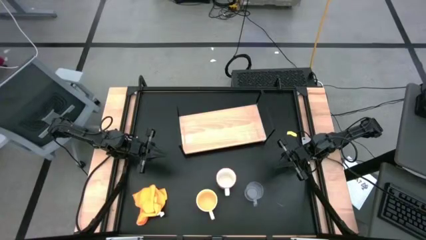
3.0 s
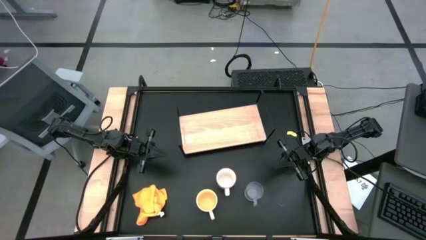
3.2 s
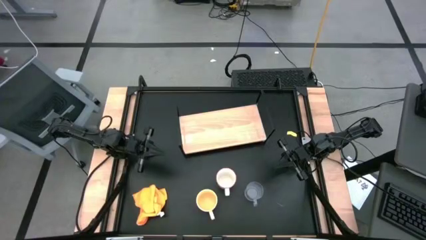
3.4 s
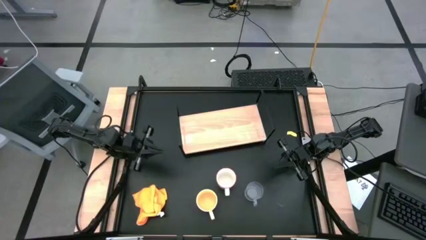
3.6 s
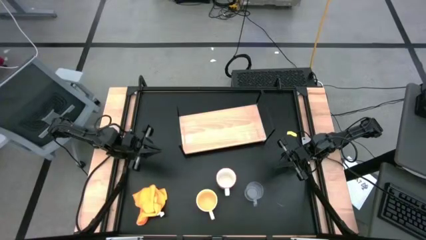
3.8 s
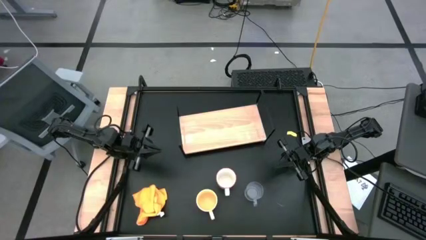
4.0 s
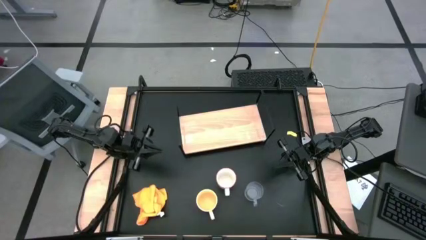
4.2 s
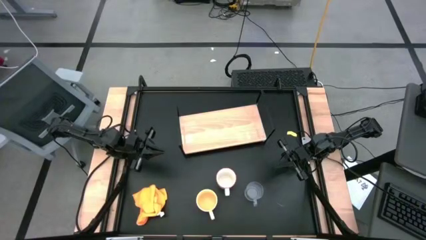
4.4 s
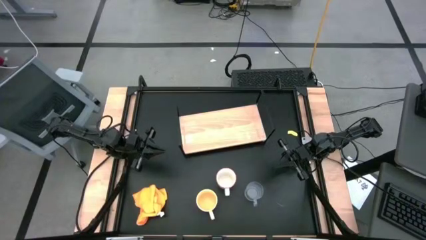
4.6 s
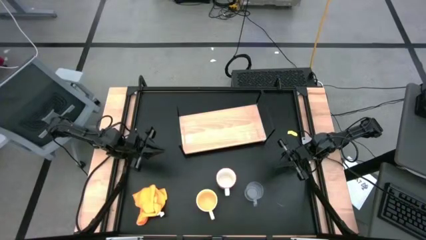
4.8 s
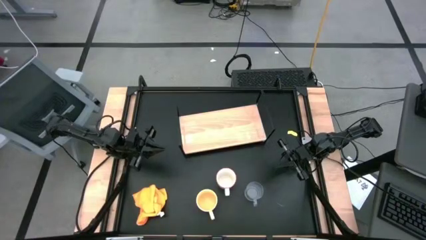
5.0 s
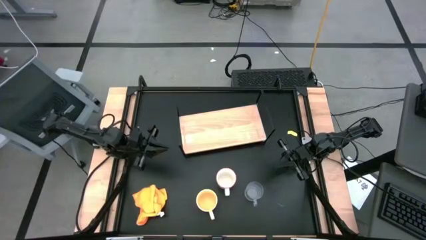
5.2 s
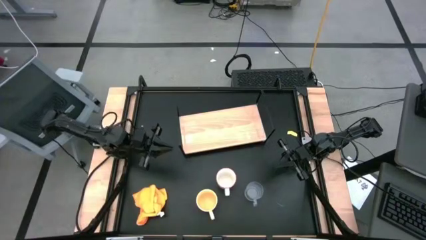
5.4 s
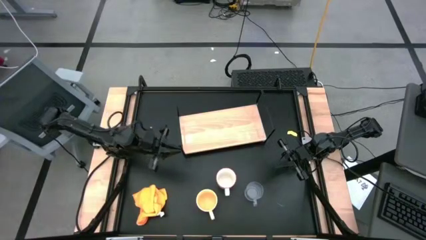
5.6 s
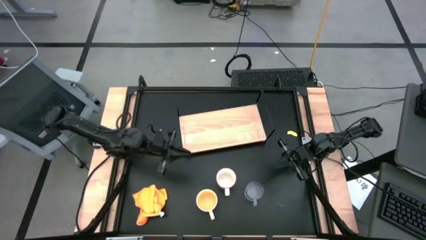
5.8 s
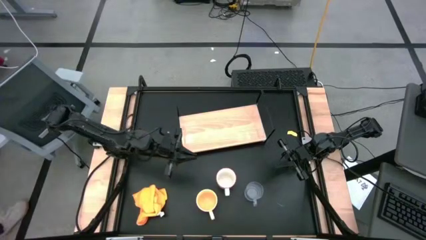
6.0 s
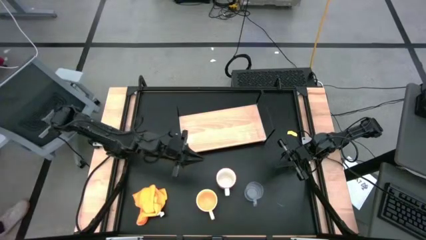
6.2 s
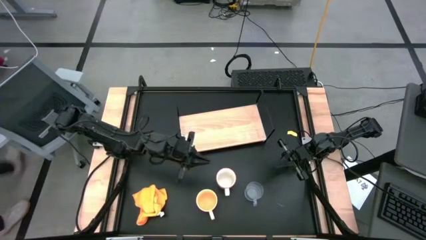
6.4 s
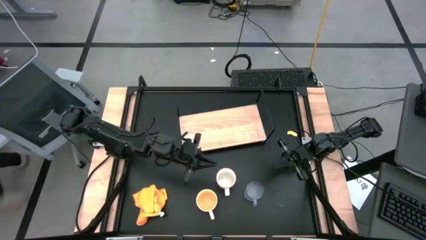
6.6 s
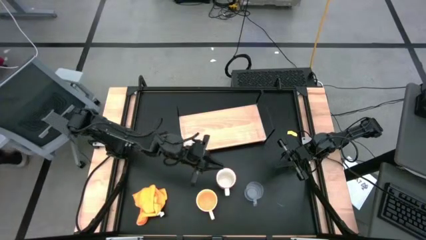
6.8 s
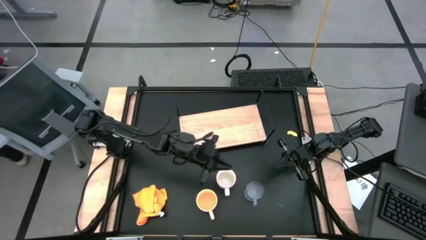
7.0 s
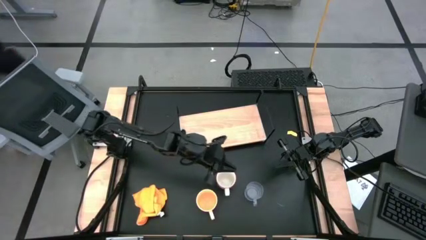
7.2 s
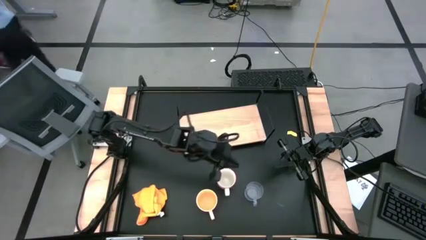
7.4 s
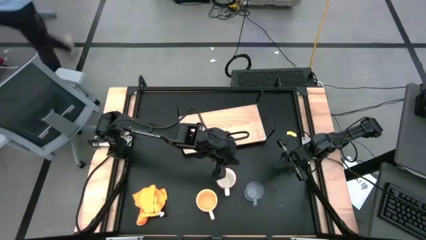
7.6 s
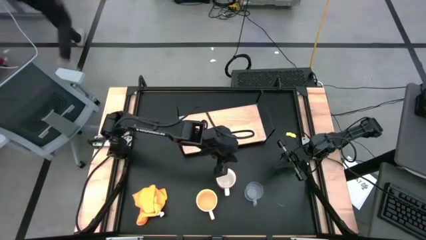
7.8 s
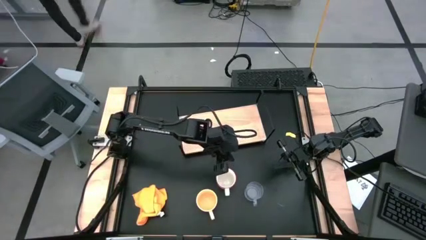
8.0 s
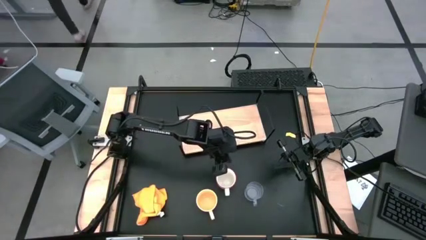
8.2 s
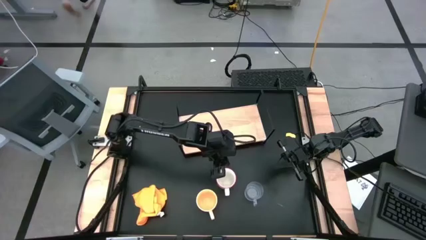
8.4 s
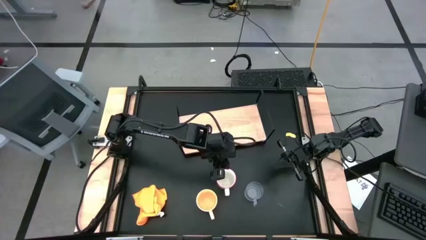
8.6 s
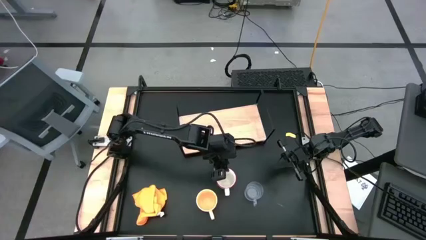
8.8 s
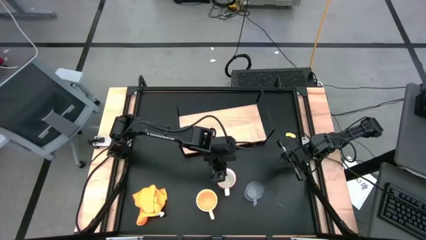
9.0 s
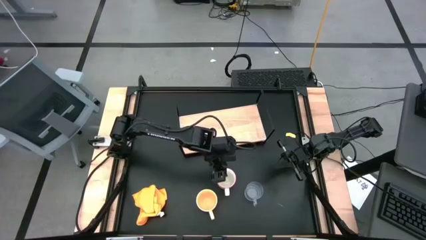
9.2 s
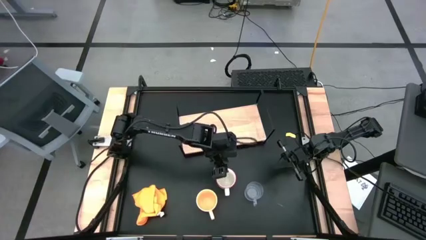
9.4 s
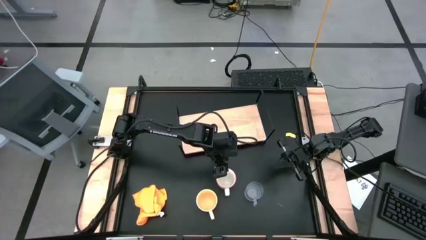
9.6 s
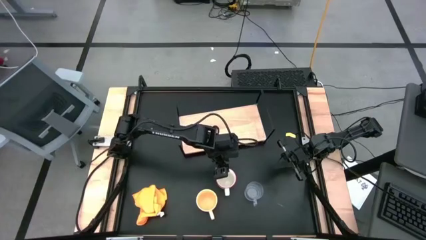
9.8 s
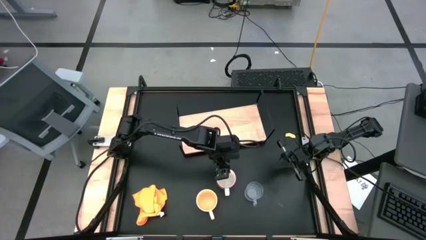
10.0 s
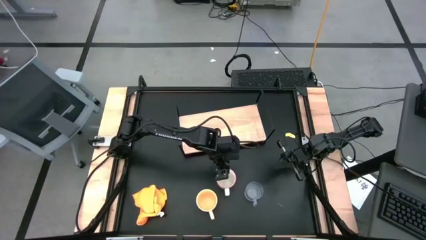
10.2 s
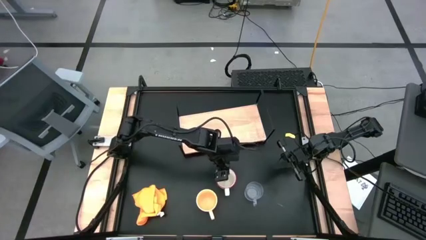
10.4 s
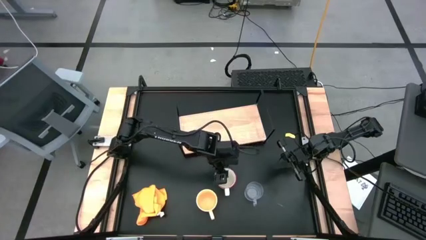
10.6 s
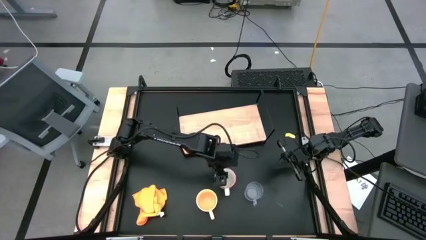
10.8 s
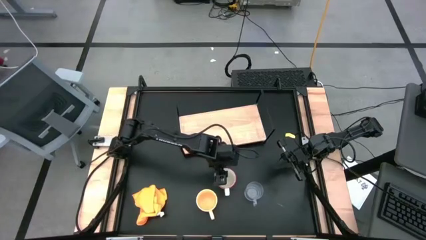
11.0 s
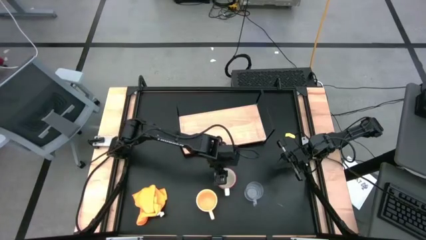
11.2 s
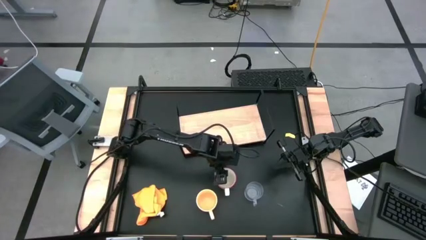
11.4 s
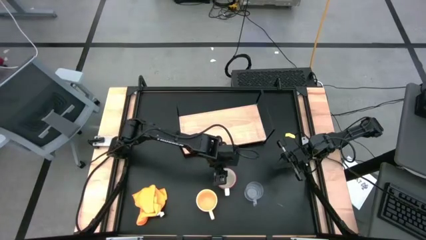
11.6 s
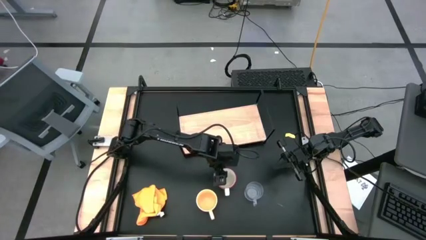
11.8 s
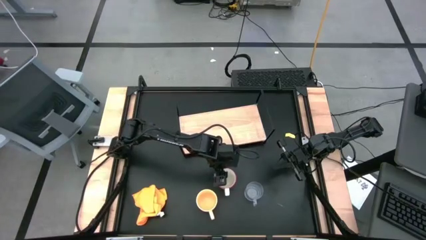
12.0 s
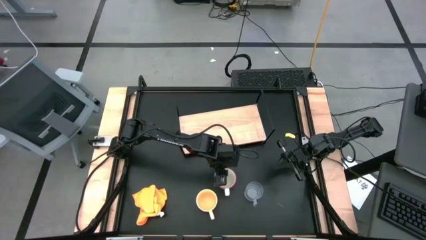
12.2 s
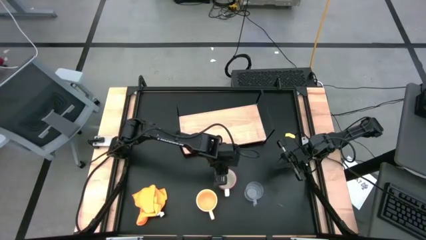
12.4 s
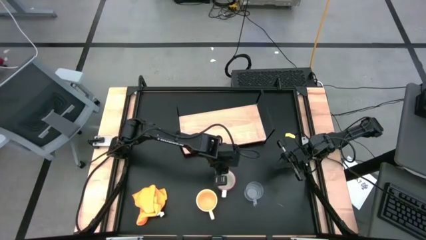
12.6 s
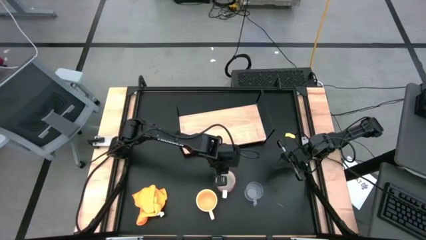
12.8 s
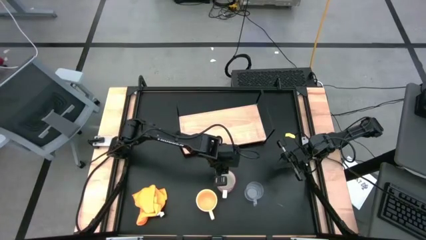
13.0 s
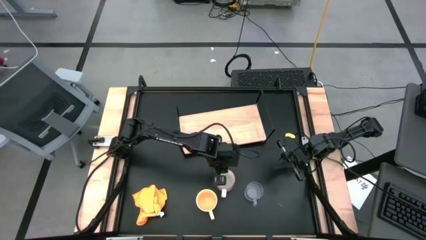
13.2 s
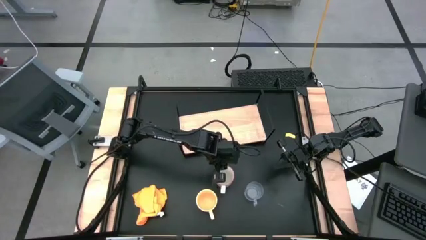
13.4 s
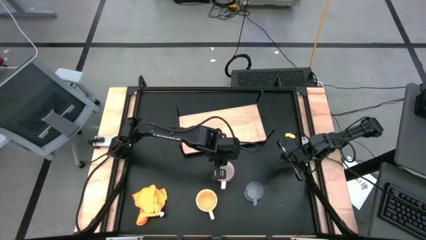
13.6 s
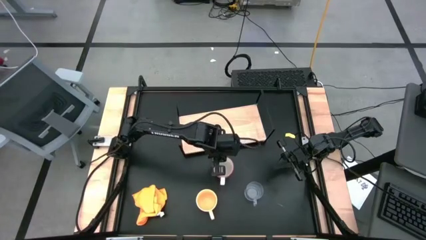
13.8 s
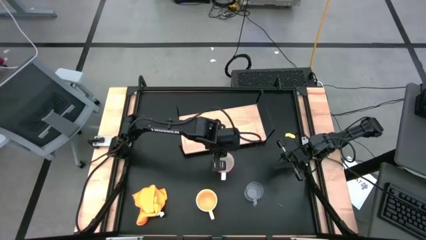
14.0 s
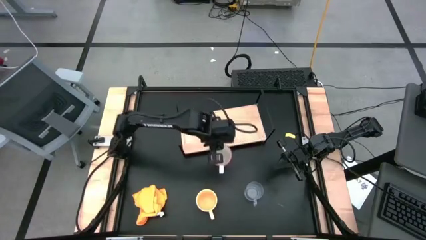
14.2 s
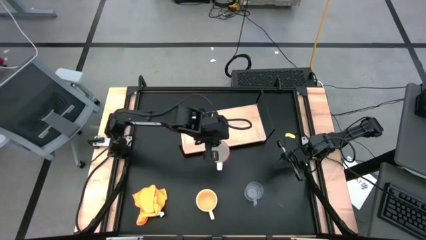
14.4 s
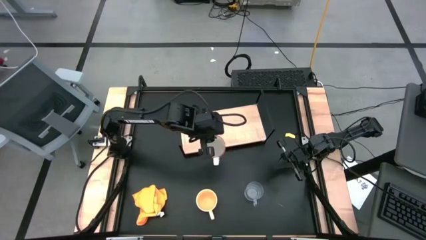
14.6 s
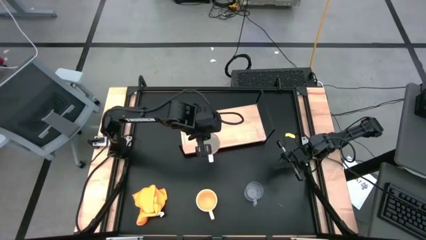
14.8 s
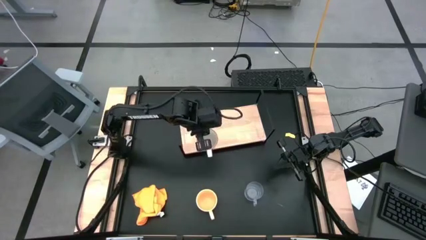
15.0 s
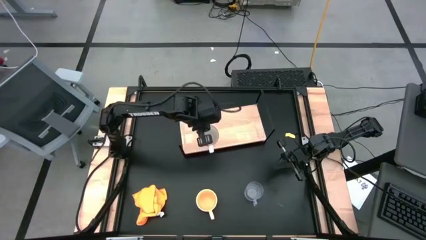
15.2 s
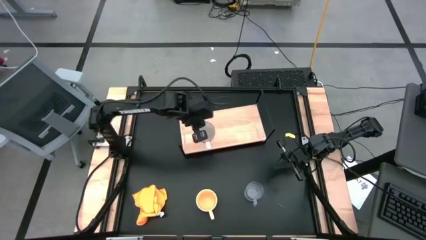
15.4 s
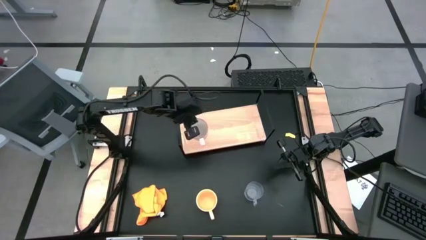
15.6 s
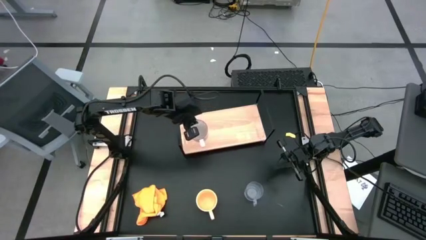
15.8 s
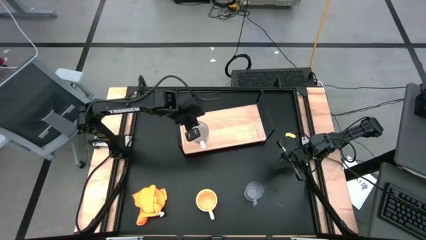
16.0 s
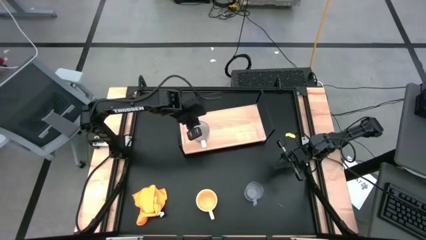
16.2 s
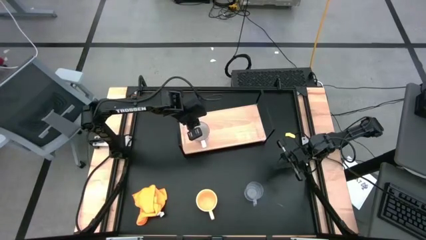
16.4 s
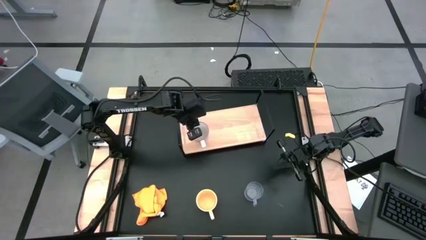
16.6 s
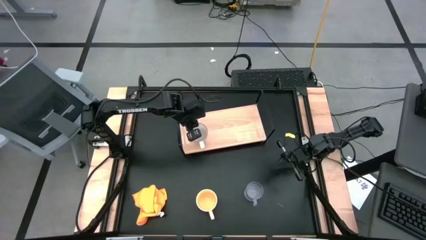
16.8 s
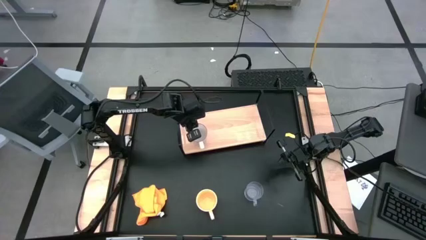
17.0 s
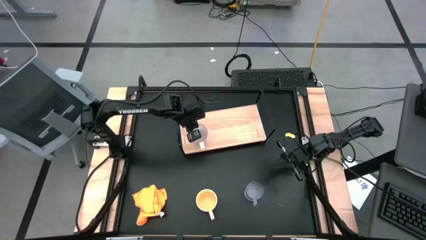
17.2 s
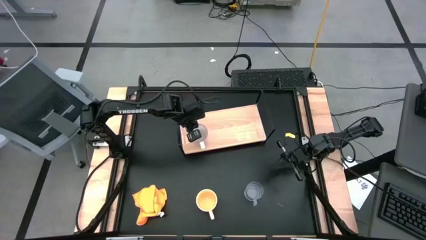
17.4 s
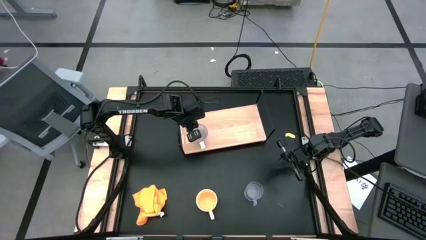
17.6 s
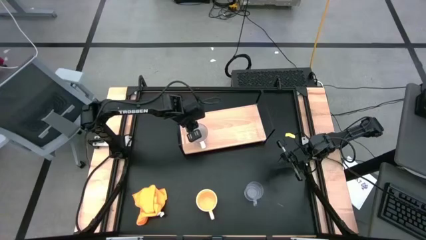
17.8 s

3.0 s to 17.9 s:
Task: Stack small to large cups/mugs on shelf
Put the gray patterned mug on the shelf
